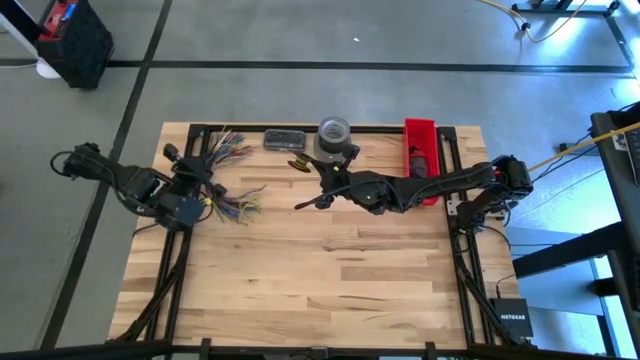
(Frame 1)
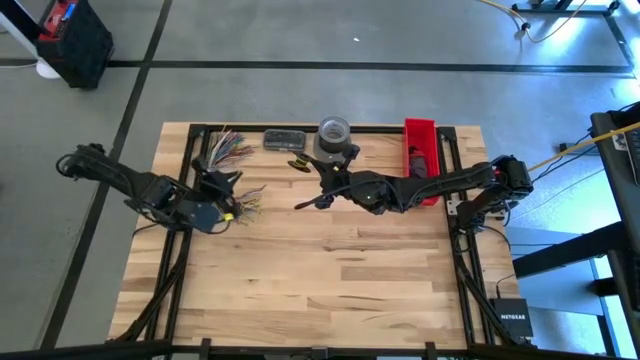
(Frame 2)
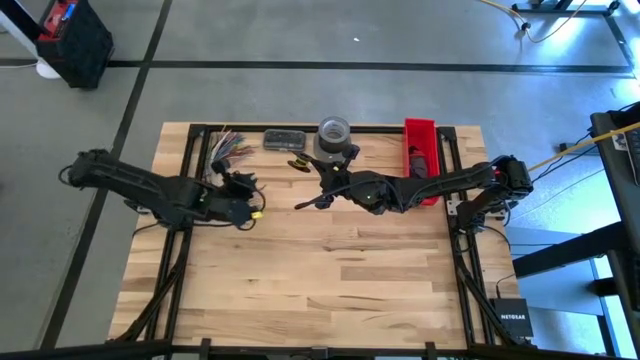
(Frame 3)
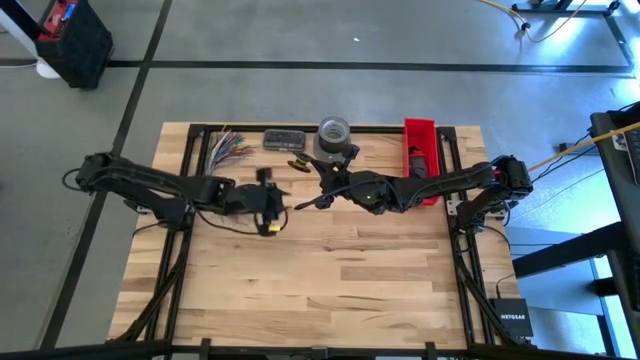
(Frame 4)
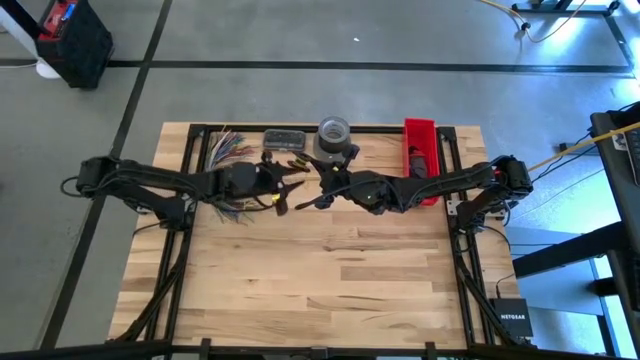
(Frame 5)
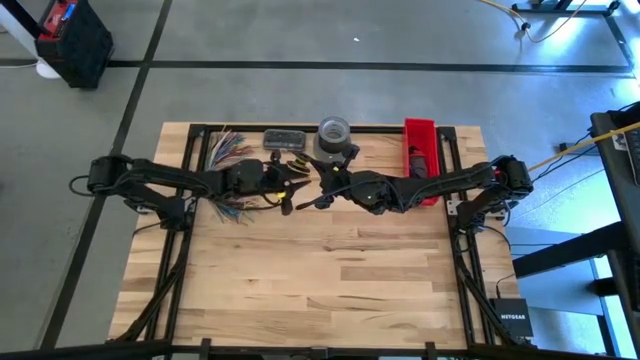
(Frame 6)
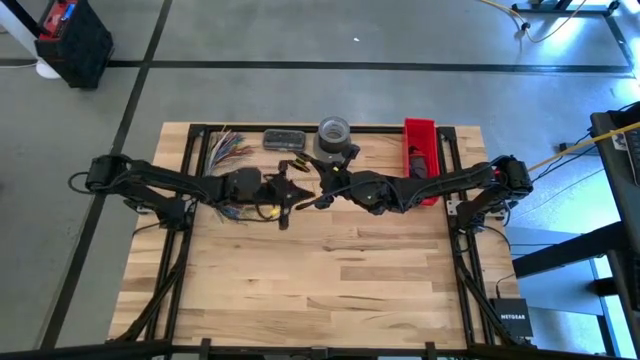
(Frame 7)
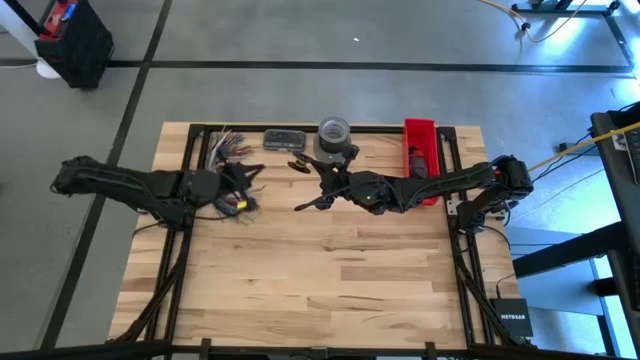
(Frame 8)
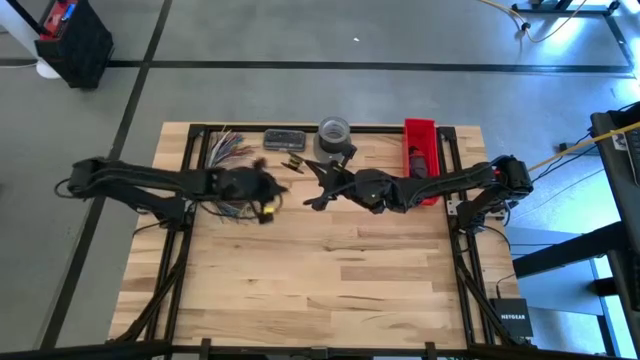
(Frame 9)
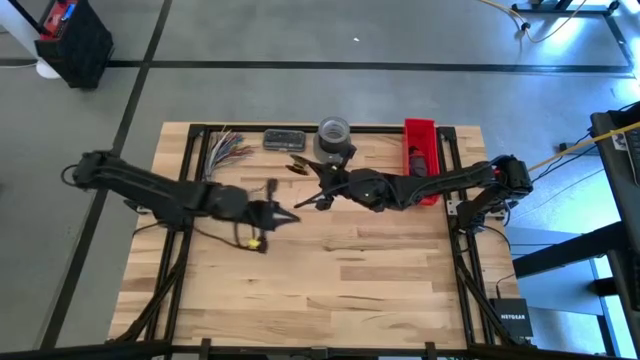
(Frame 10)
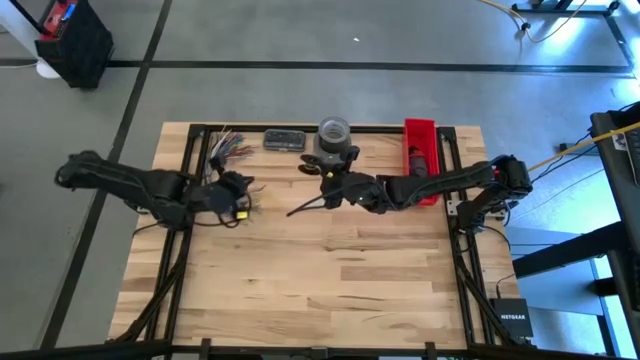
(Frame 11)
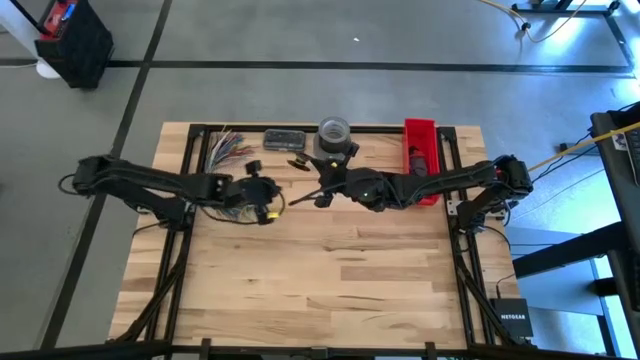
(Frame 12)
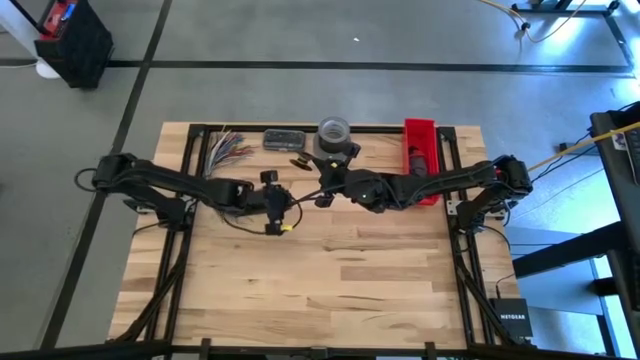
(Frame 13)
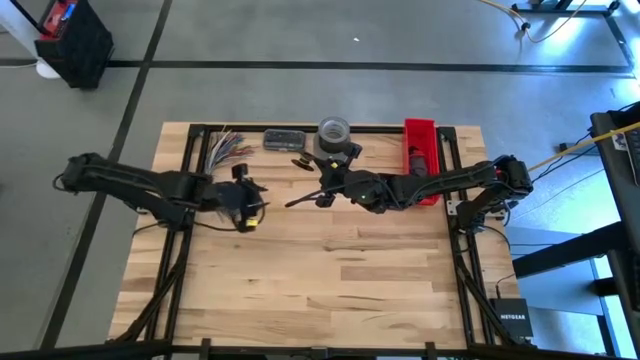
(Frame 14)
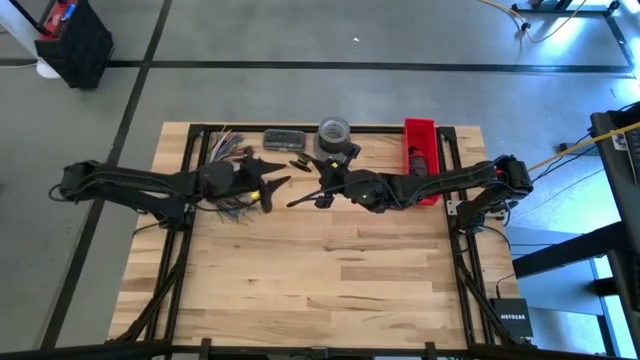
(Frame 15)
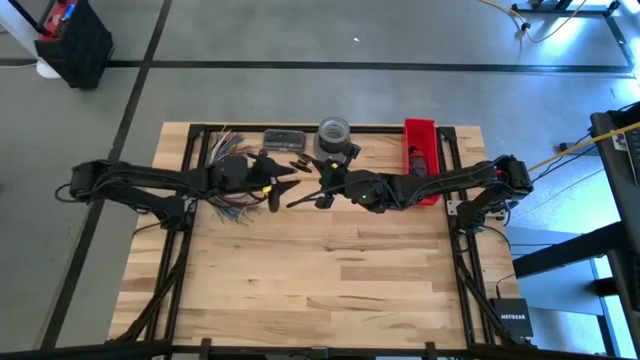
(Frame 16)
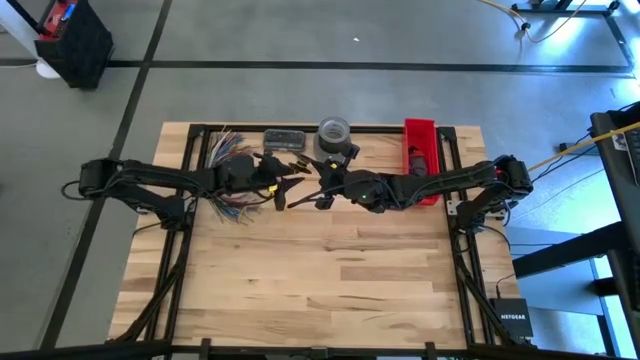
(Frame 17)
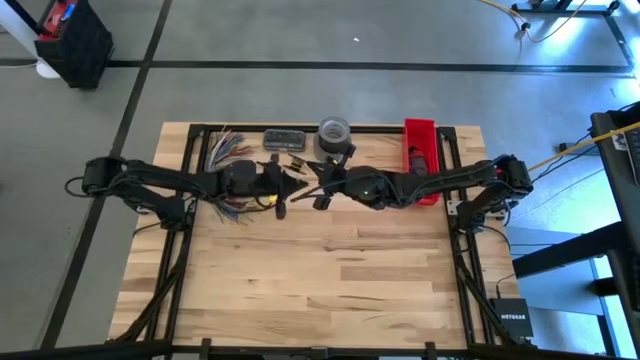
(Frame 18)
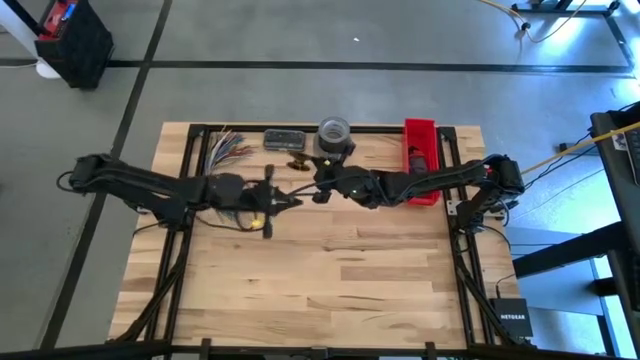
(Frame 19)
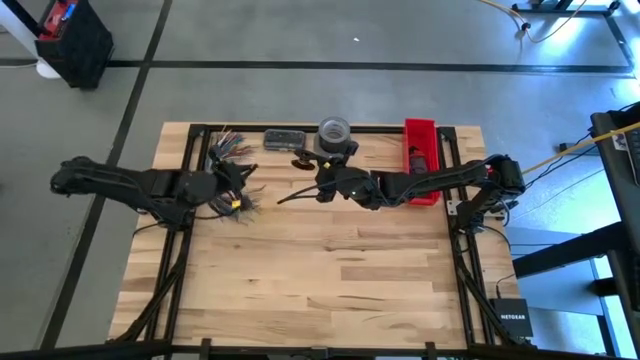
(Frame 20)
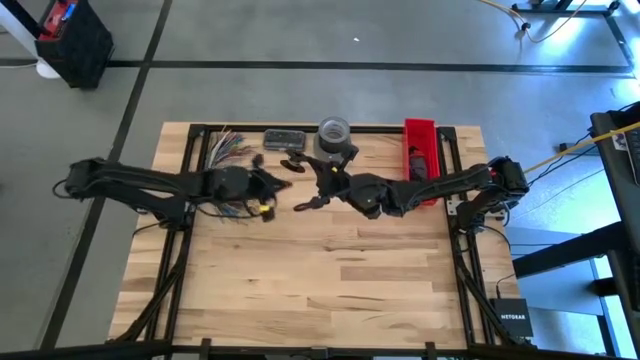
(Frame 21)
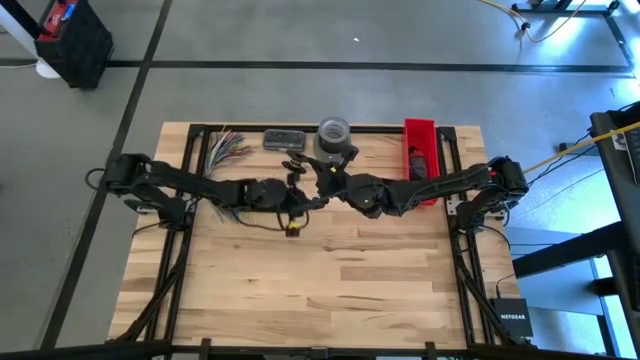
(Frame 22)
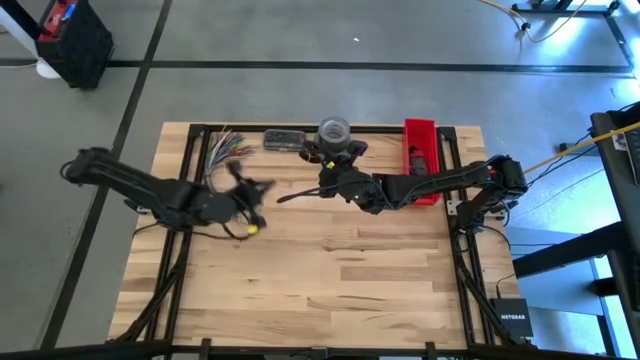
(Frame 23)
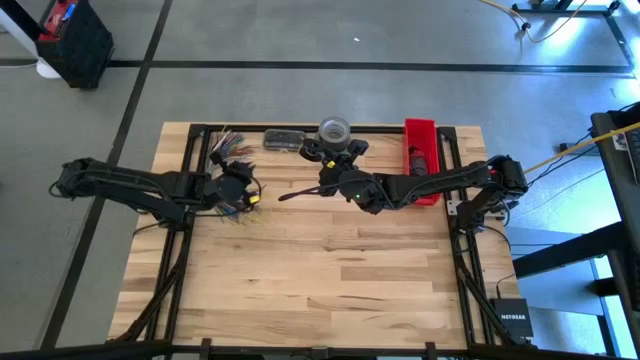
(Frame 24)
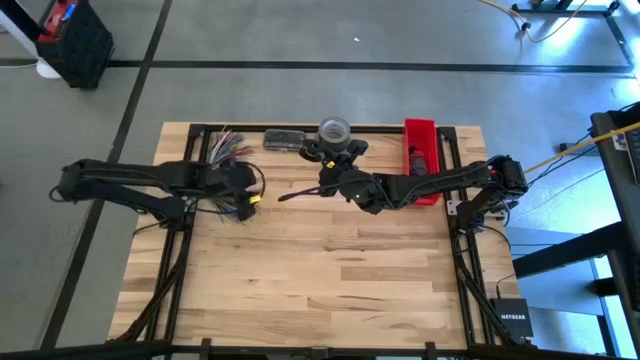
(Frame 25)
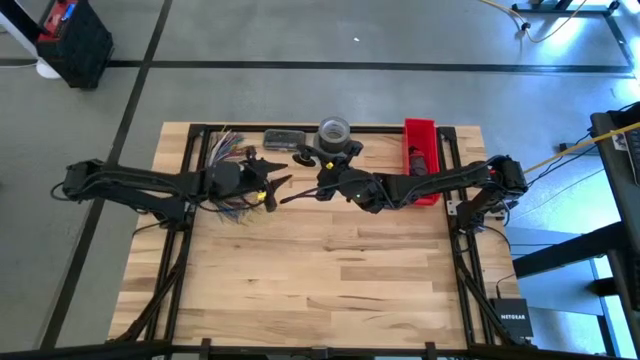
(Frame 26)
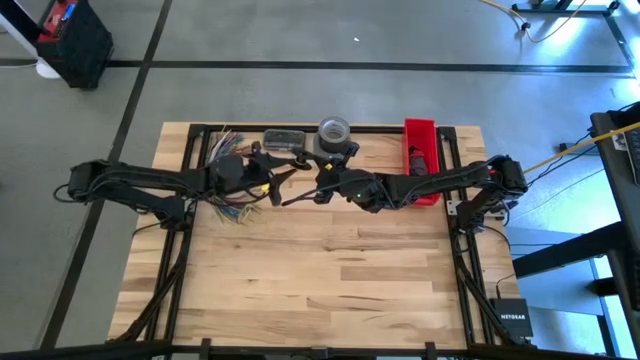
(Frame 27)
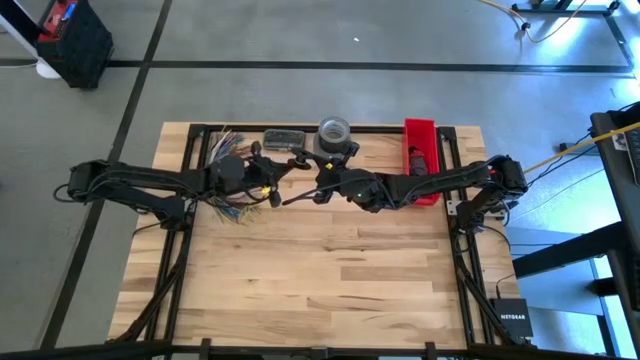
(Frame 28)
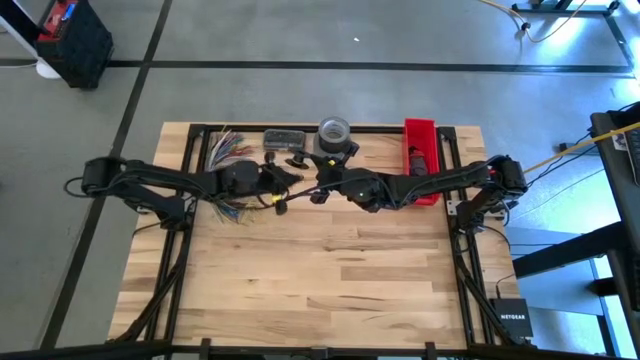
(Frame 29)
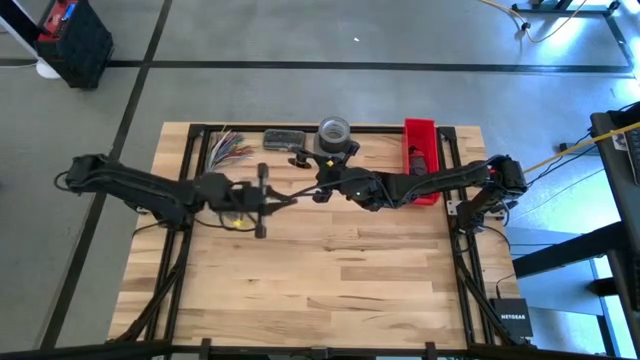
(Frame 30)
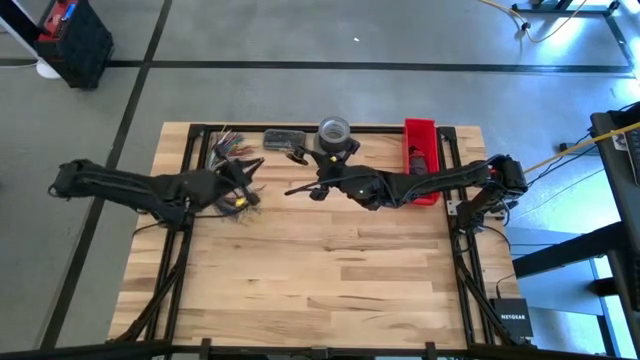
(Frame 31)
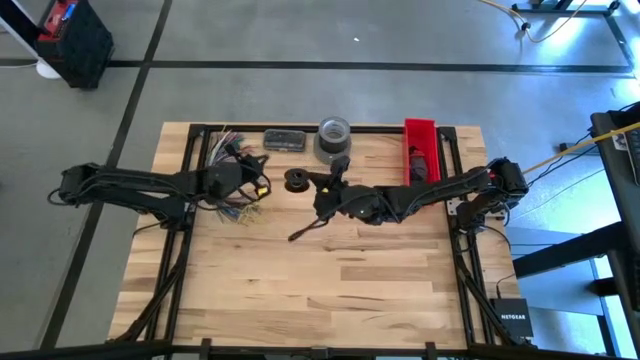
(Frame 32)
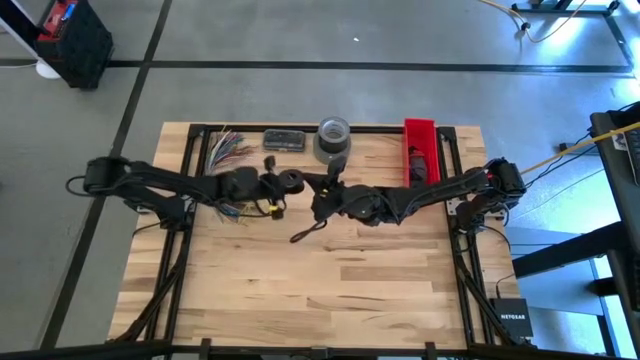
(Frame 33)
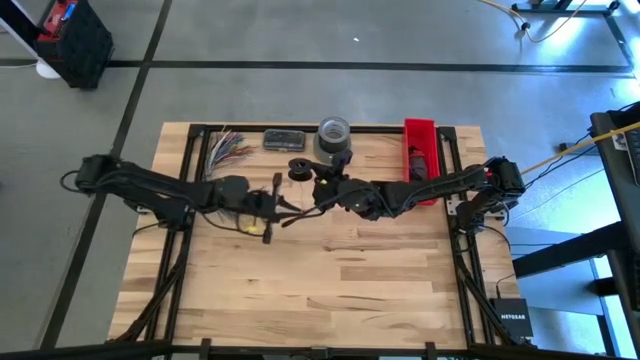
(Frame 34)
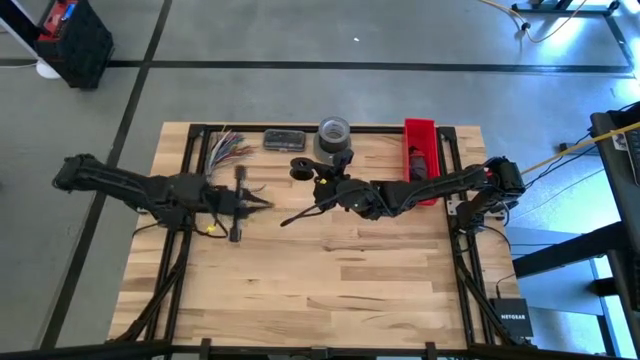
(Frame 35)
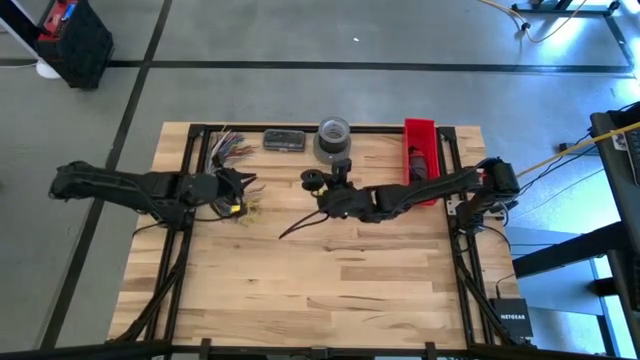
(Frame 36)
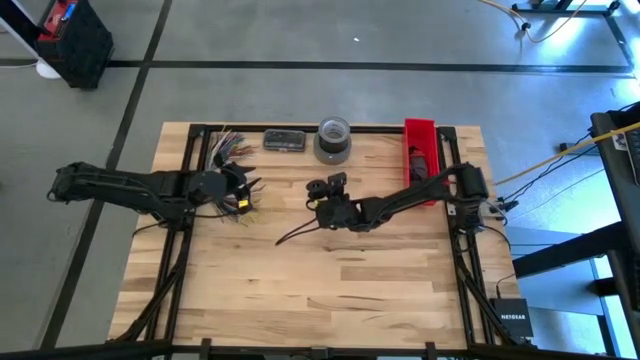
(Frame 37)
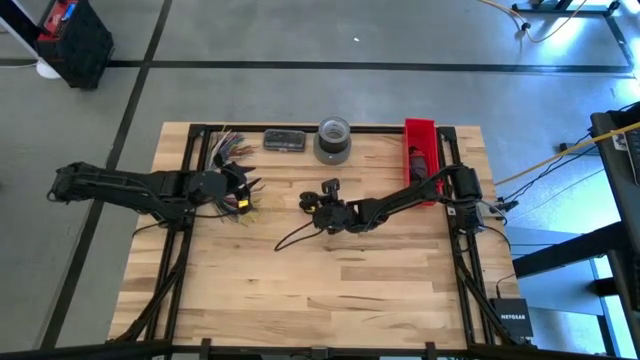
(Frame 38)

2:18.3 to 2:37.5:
Task: Coil cords
Uncoil the yellow wire from the spool

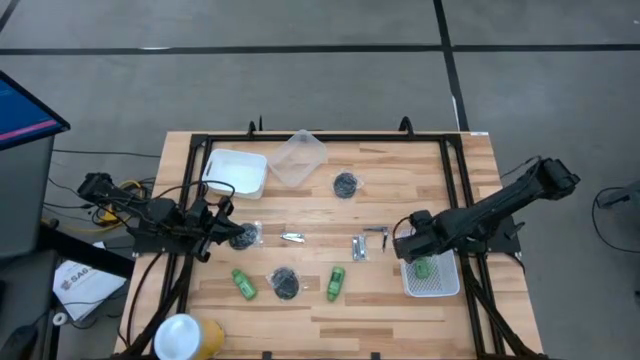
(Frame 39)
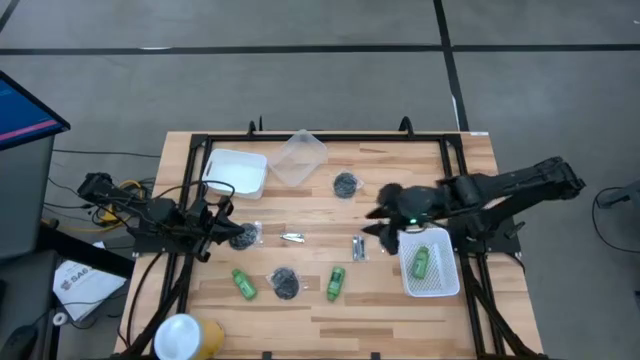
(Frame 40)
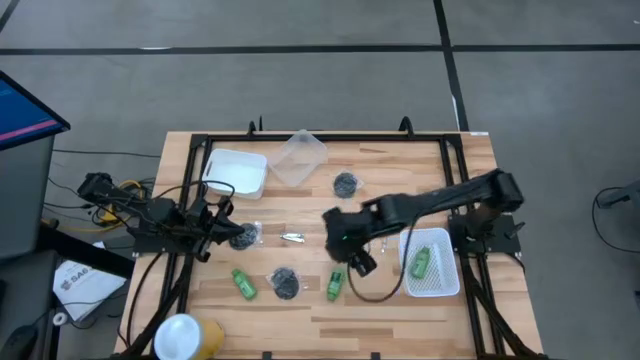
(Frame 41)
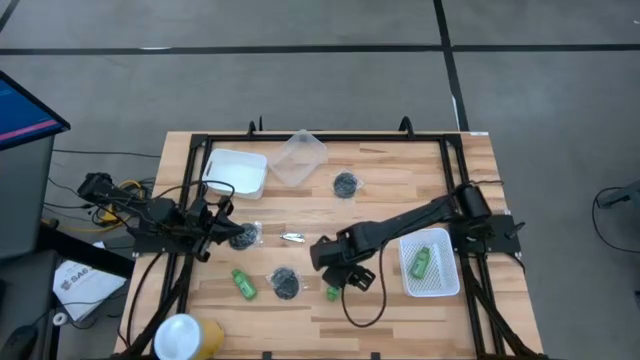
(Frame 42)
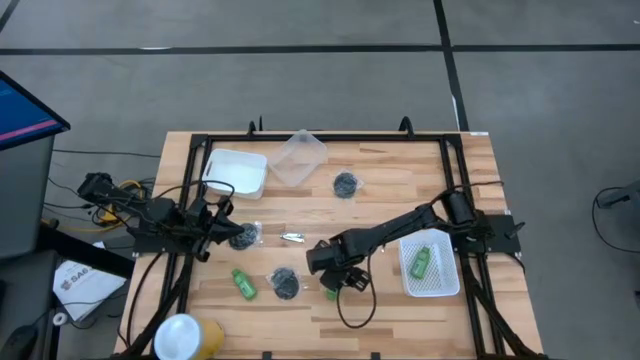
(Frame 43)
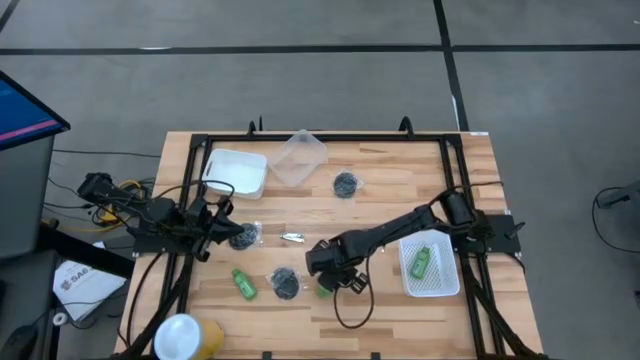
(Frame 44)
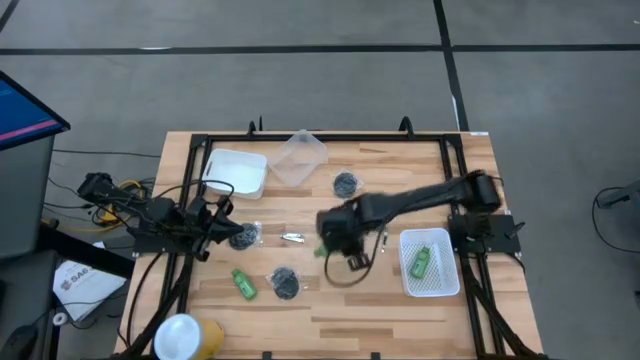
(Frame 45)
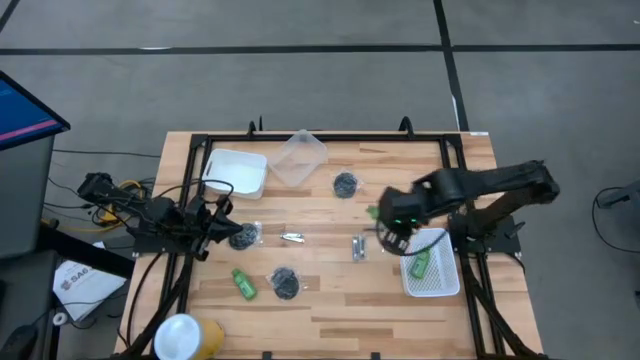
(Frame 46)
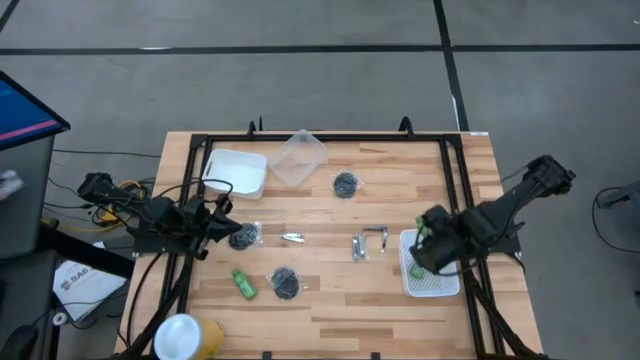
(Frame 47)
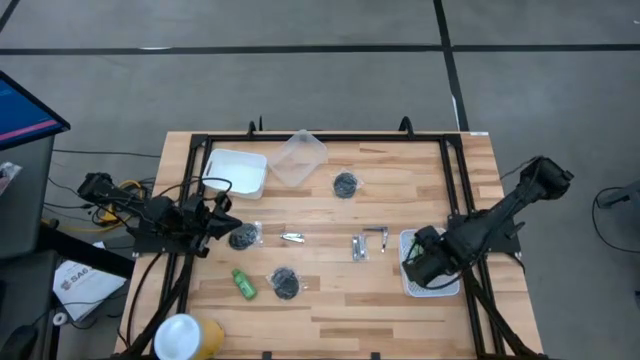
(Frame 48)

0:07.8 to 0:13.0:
Task: Pick & Place Travel size toiletries
Put the green shampoo into the bottom white bin
